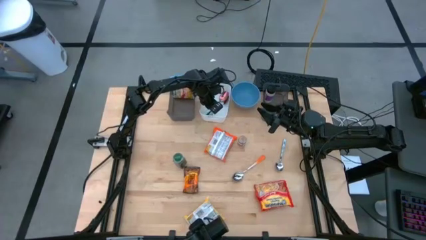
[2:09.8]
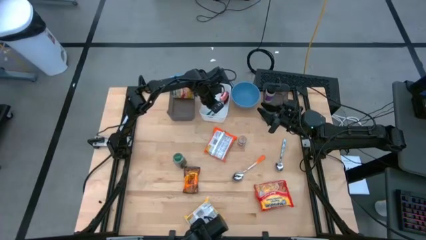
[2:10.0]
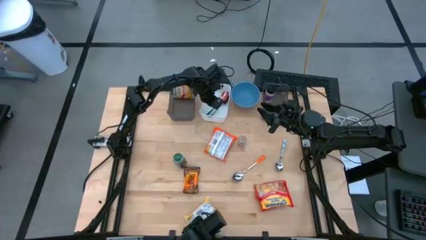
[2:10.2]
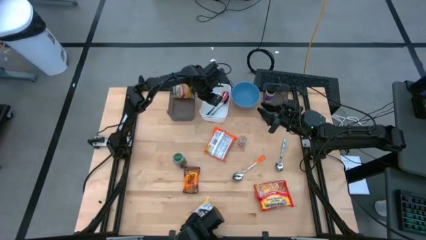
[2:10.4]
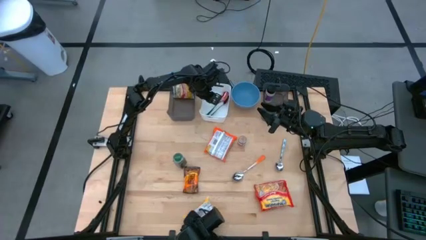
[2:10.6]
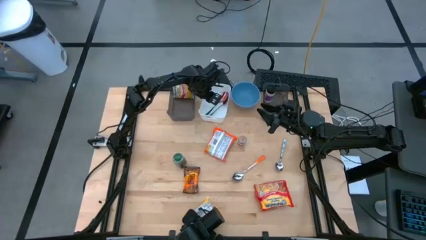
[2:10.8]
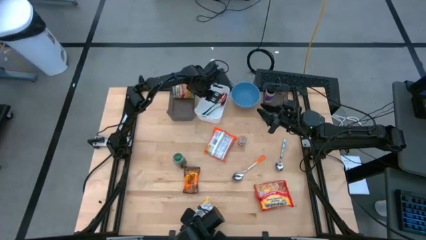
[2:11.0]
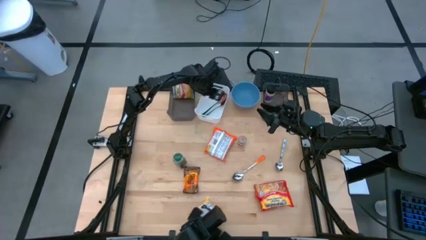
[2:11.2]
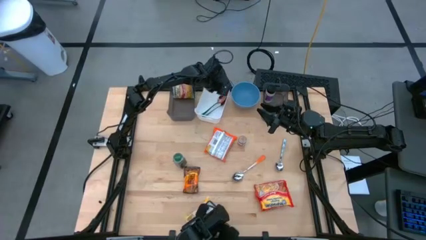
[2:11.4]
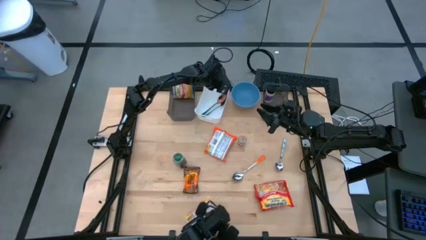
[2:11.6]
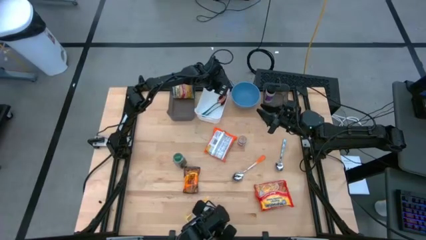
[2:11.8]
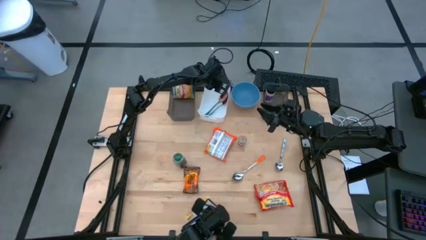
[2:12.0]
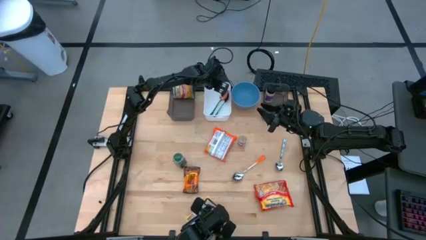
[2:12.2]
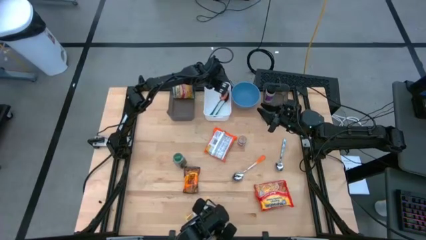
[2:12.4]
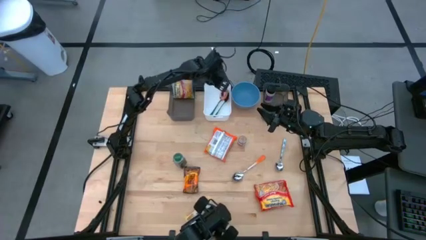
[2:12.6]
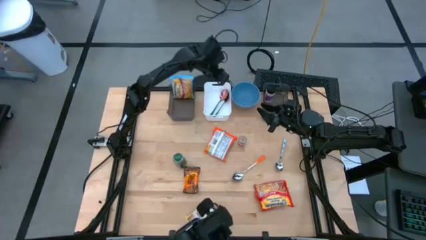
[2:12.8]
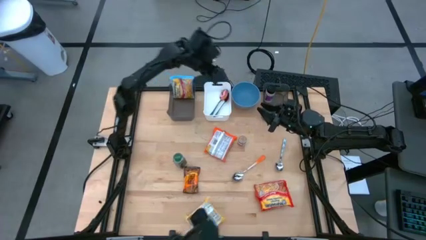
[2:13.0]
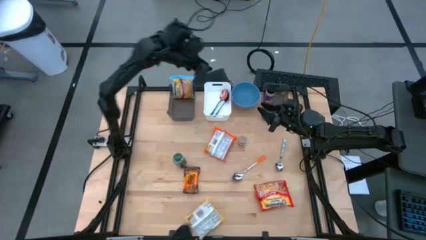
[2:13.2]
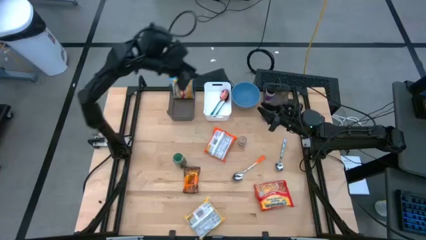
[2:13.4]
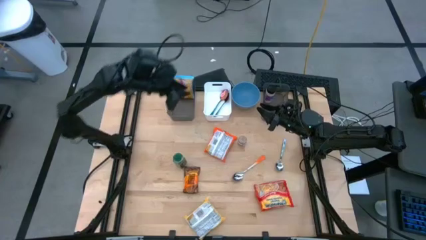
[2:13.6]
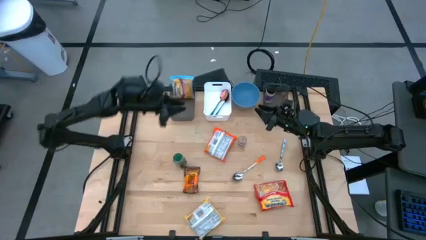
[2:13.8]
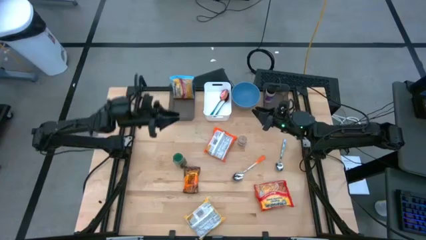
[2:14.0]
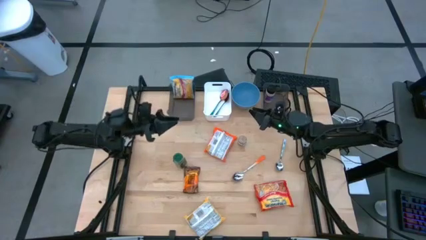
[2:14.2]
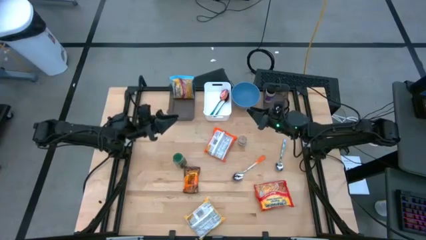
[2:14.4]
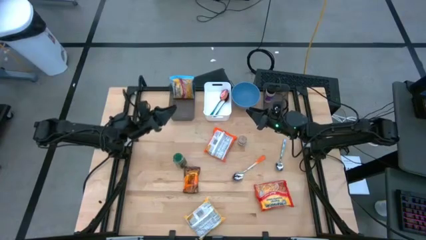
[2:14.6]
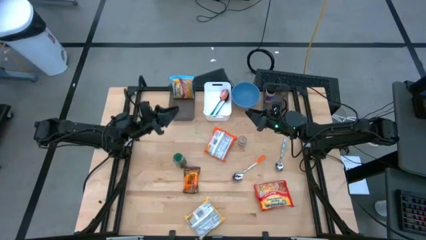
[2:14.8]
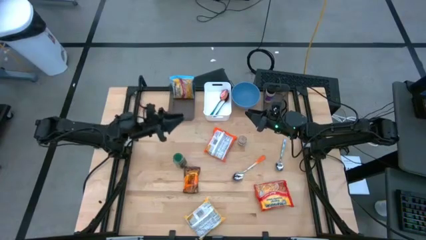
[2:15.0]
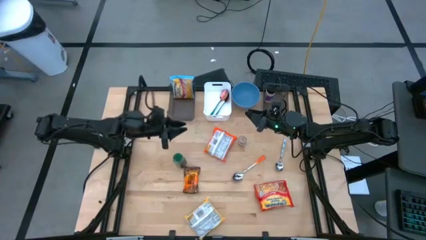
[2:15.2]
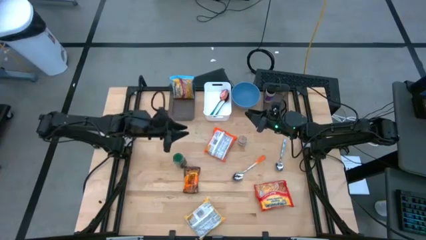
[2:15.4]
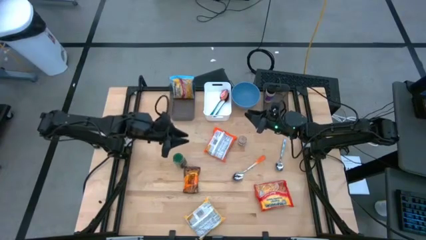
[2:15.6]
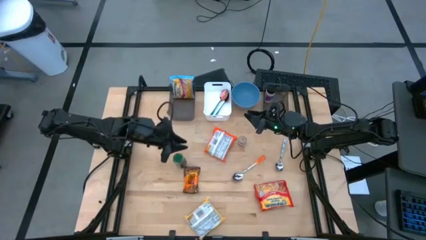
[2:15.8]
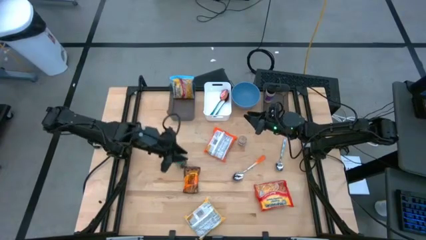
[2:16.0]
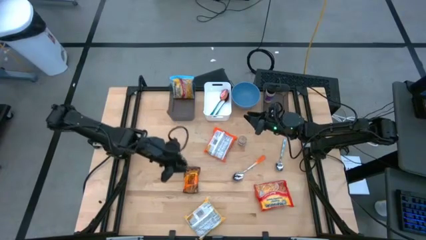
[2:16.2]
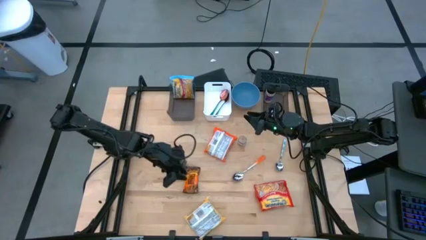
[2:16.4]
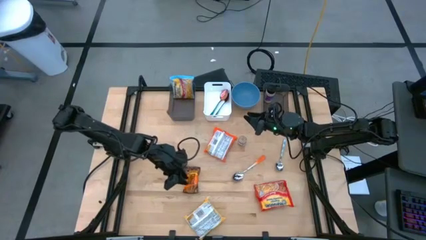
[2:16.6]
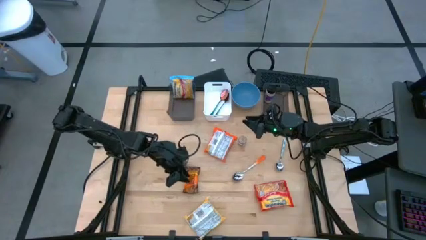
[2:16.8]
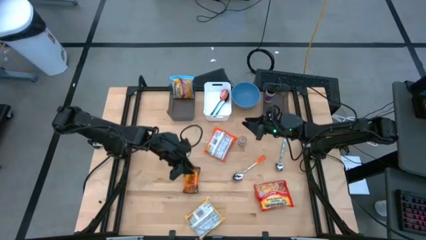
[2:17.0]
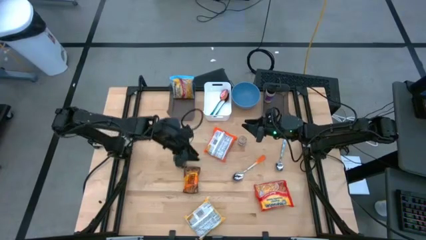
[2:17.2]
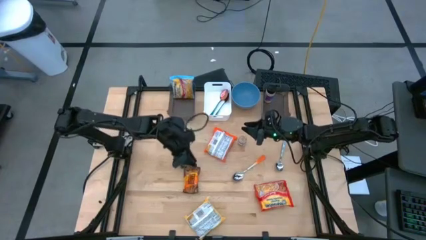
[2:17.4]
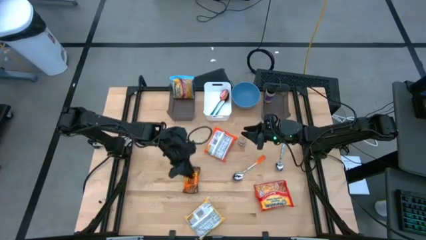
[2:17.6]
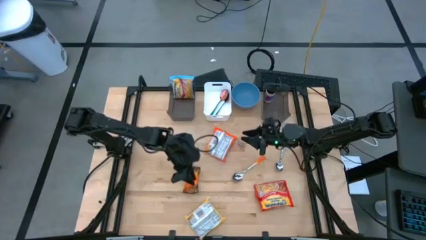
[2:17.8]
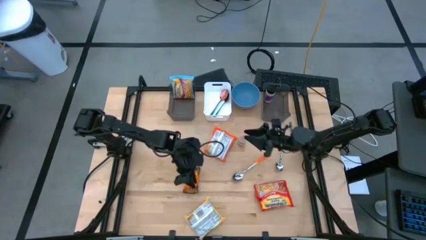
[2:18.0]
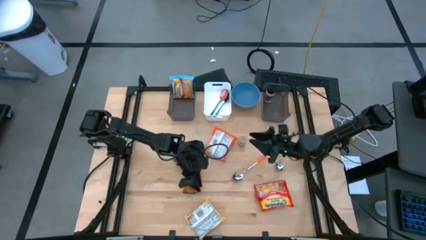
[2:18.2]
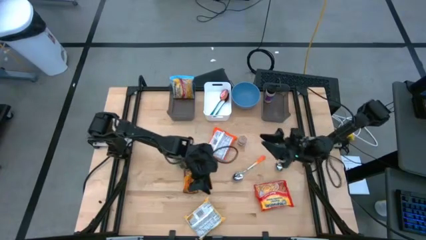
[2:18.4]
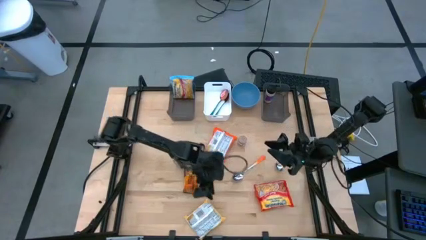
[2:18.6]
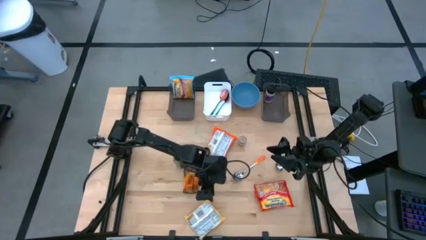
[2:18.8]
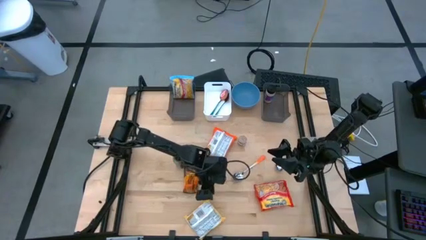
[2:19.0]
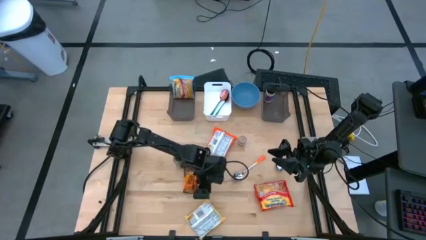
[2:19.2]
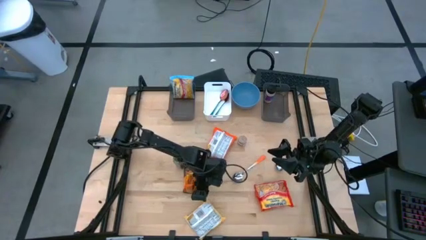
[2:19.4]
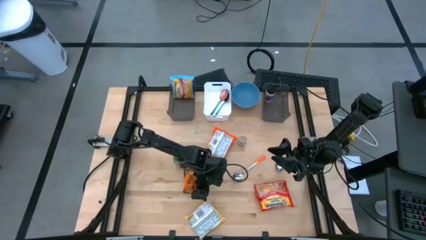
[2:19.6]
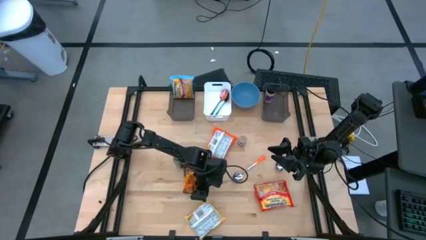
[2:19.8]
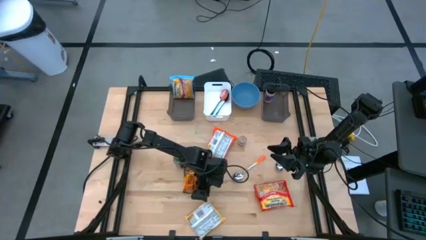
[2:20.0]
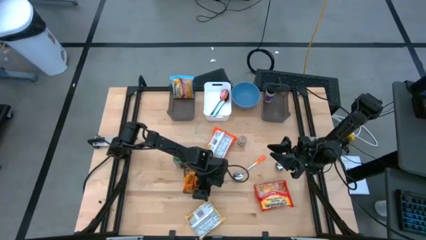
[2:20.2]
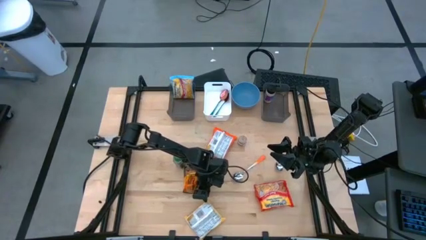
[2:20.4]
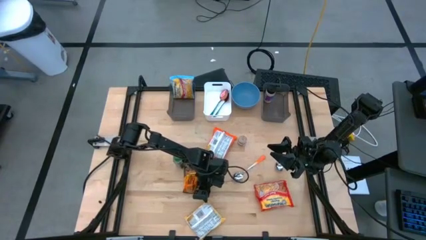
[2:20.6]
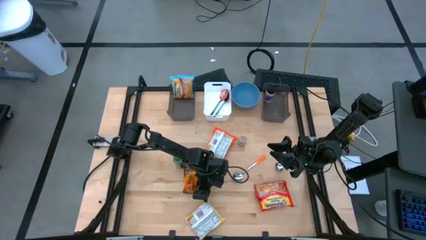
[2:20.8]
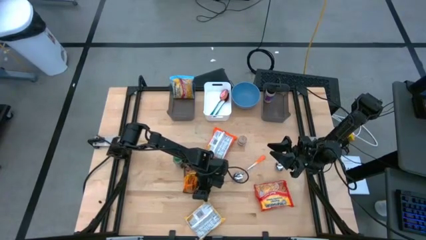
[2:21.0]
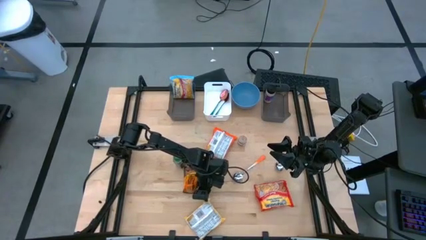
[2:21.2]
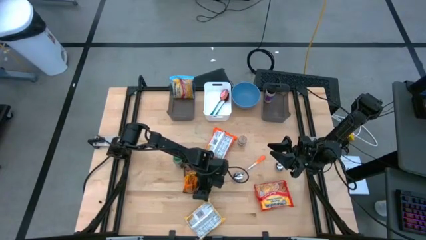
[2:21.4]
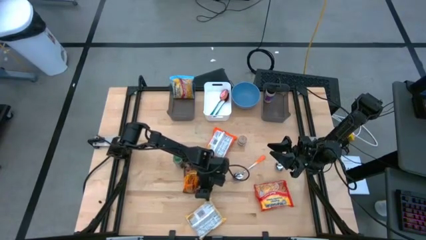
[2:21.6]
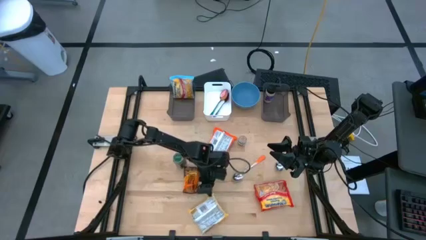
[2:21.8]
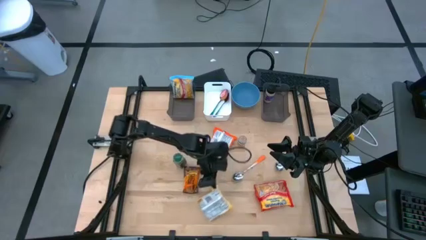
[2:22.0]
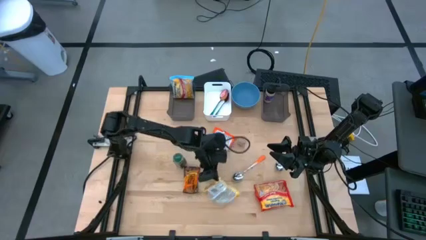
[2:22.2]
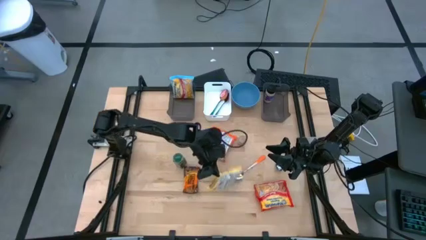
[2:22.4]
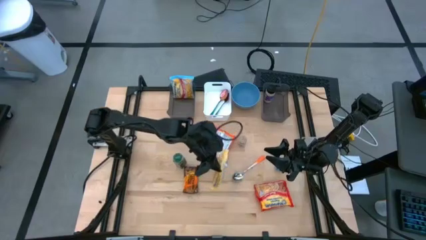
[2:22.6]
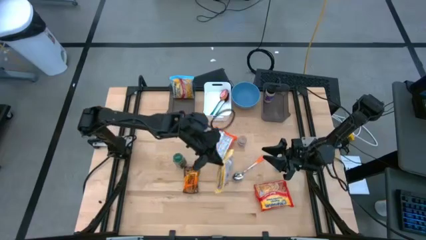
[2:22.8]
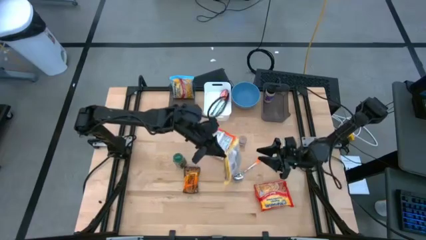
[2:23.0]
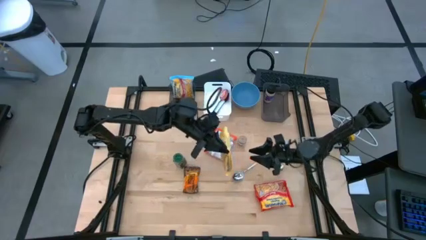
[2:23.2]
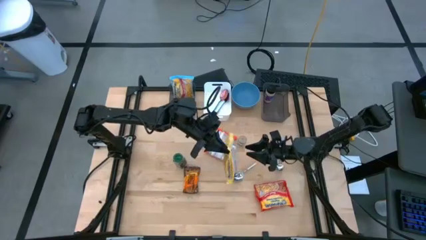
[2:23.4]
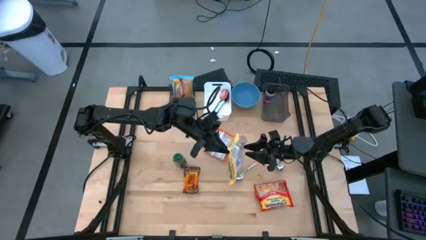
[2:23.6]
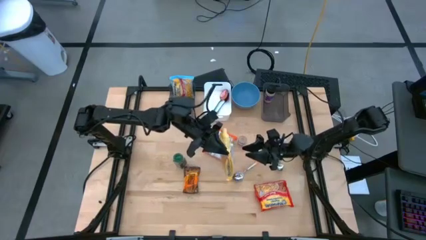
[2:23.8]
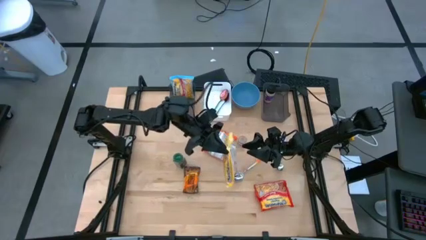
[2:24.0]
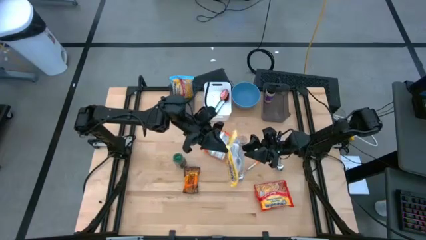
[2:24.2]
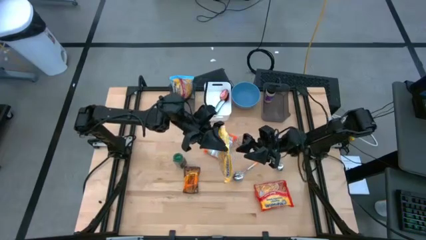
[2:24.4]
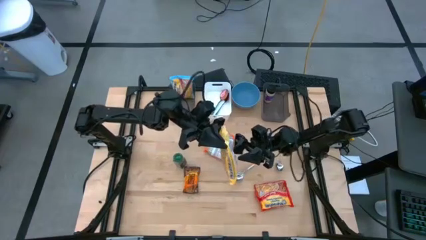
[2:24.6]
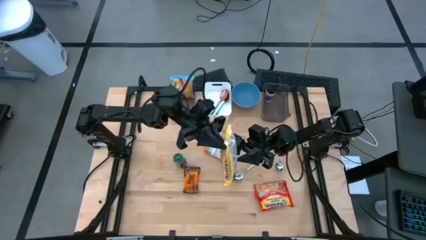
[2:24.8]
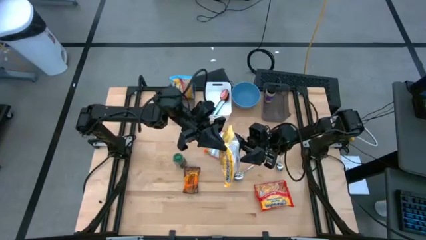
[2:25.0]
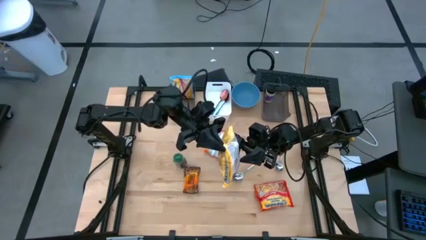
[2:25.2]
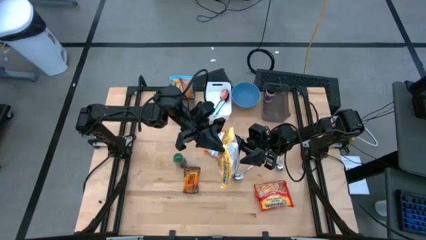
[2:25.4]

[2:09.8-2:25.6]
Task: Pick & Place Food Item
Put the yellow noodle pack into the left black bin

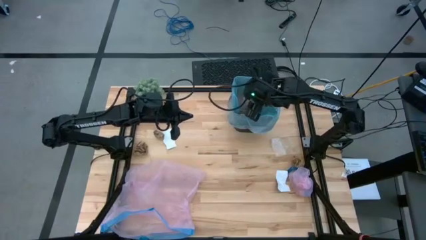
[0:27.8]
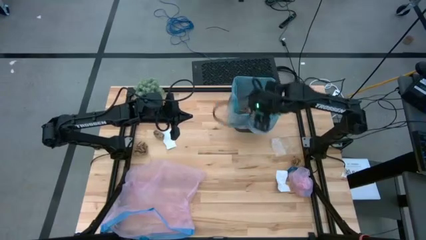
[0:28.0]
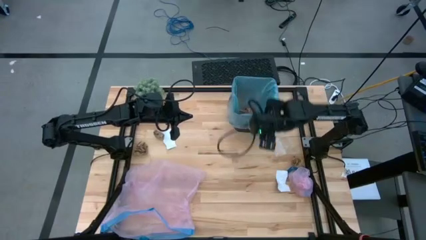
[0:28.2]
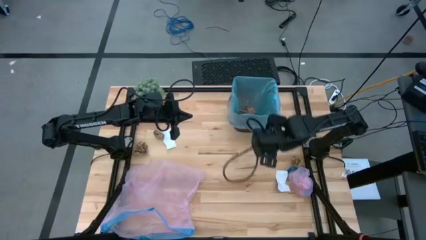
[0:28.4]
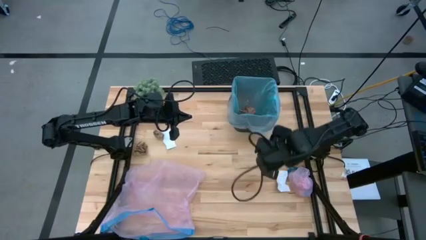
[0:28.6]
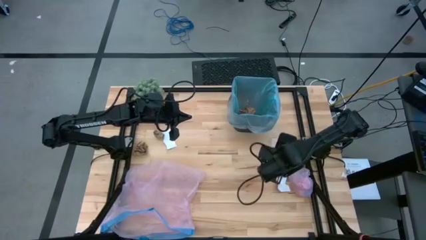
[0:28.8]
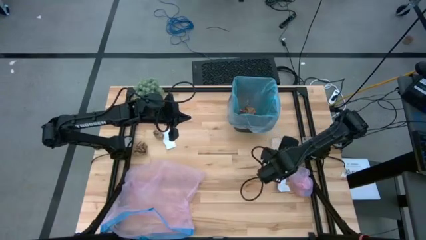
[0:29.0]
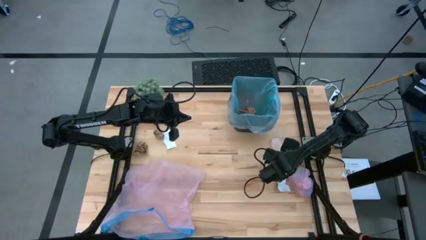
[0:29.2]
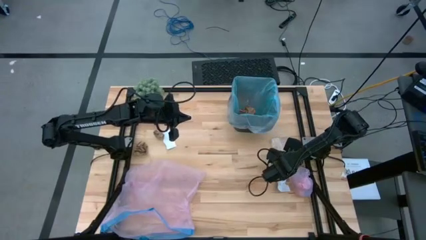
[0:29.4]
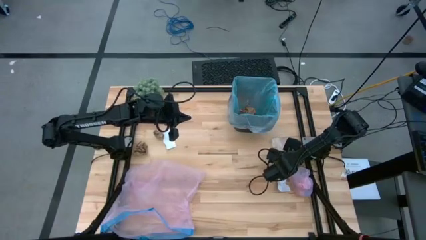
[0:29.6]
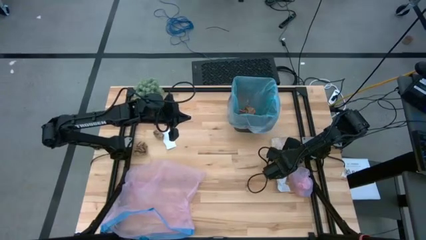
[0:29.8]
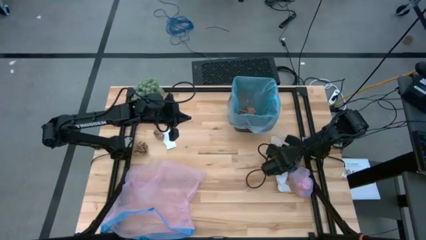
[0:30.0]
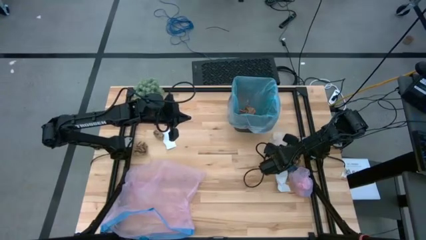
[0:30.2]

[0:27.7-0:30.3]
Task: place trash/remove bag and relplace
Put the transparent plastic into the trash bin
